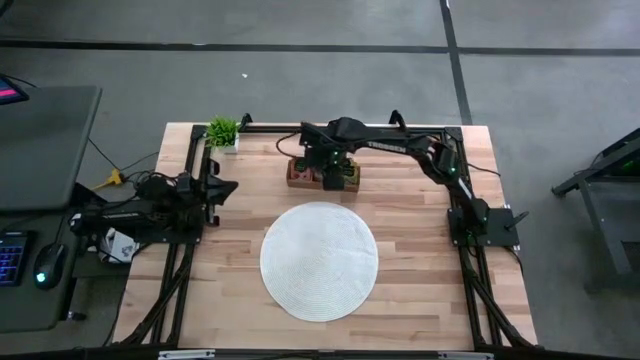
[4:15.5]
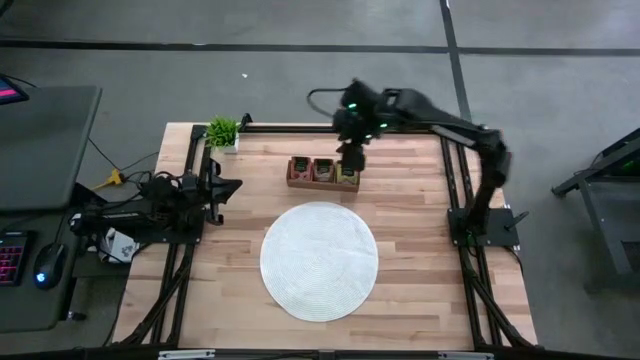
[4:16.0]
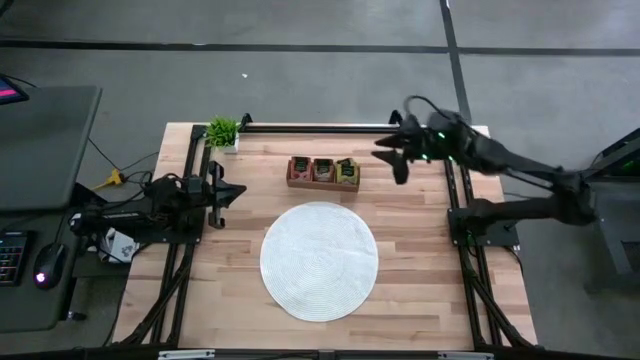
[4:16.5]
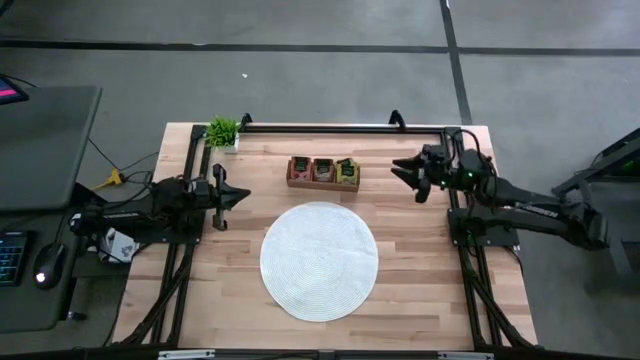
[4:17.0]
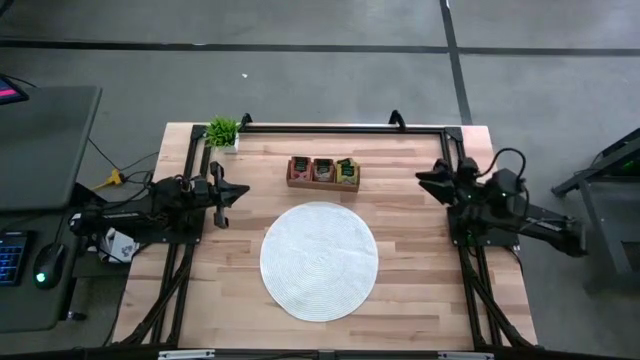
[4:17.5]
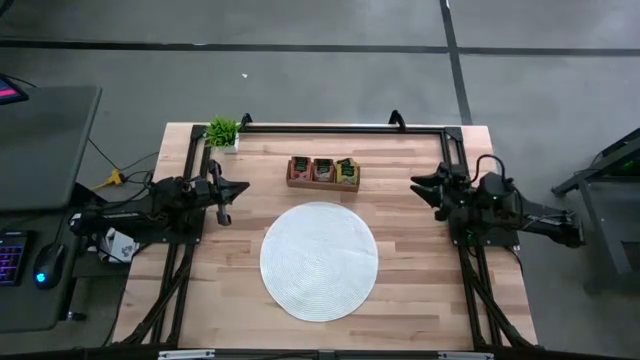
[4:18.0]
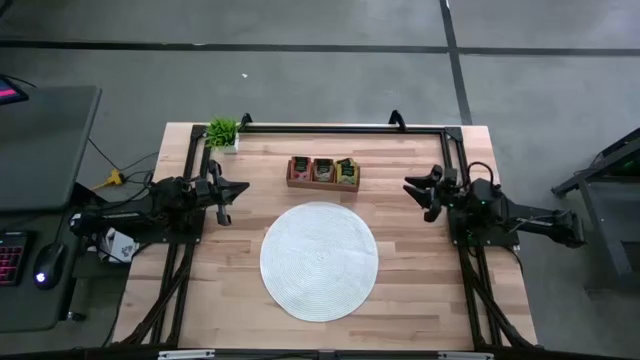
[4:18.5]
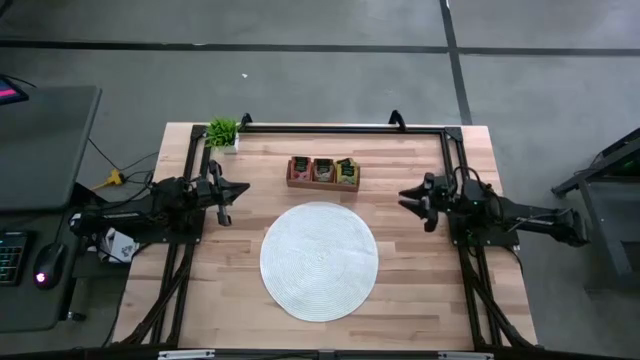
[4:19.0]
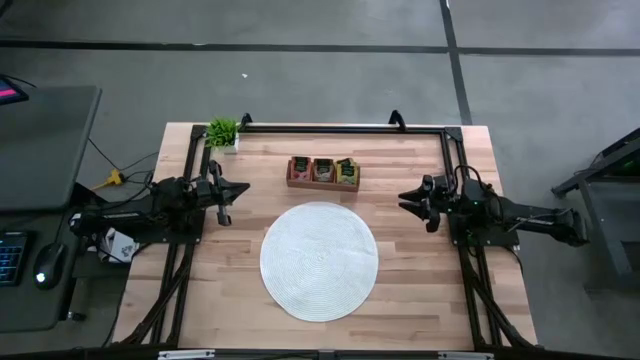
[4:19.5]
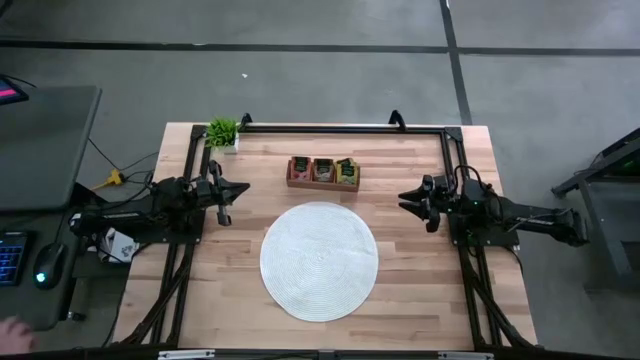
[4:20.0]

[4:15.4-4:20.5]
Task: Pick & Place Tea
Return to Home Position

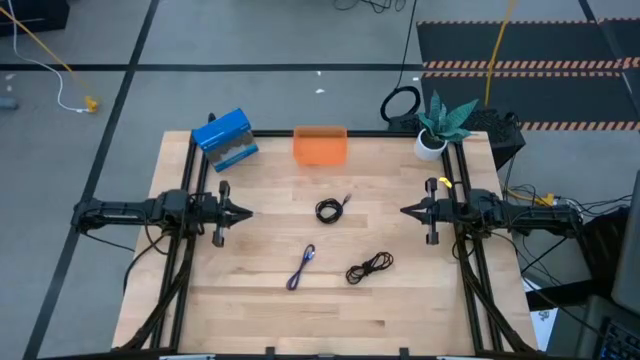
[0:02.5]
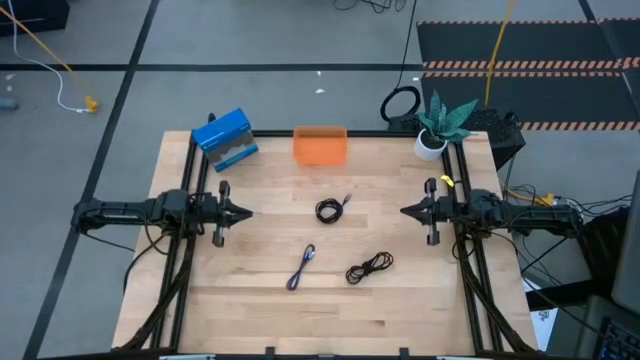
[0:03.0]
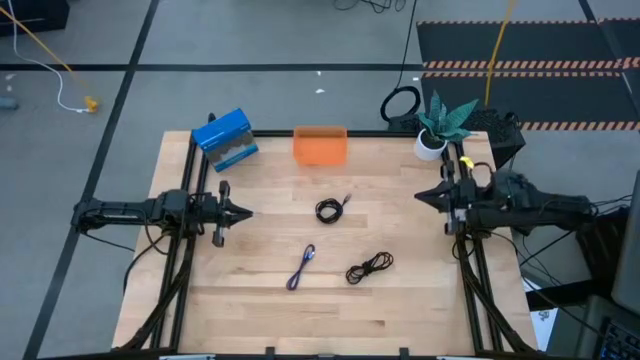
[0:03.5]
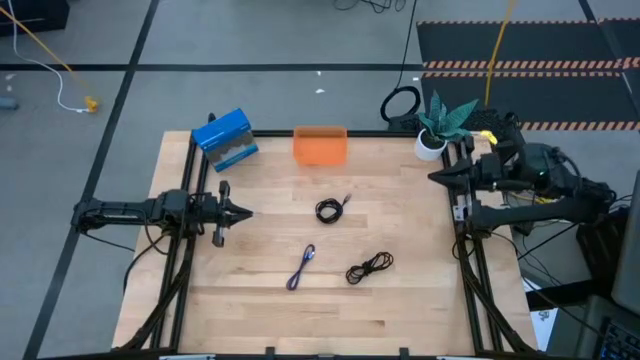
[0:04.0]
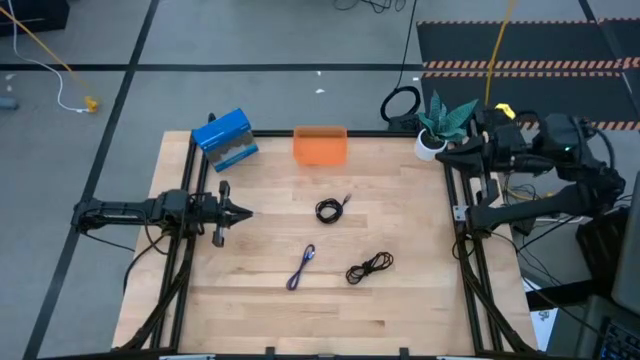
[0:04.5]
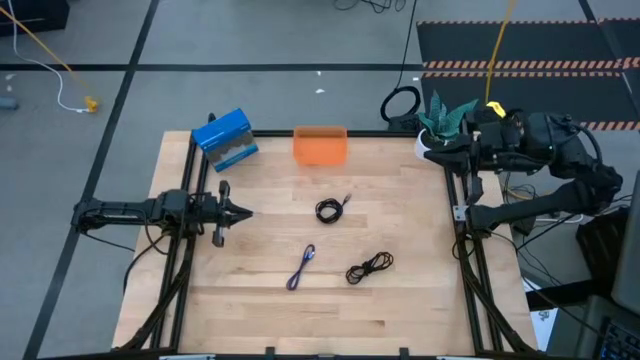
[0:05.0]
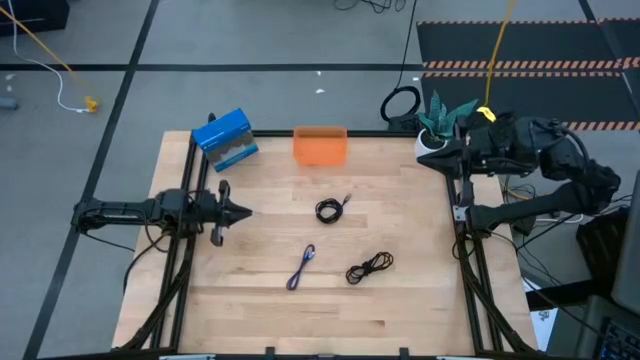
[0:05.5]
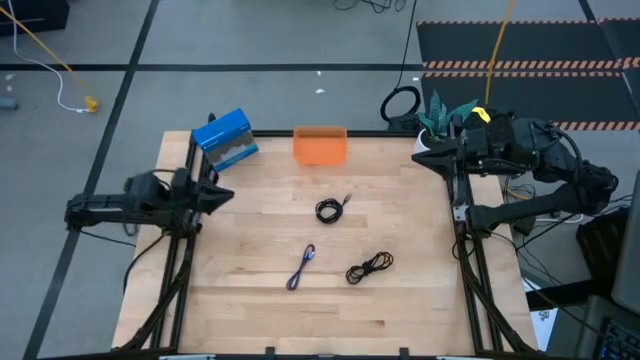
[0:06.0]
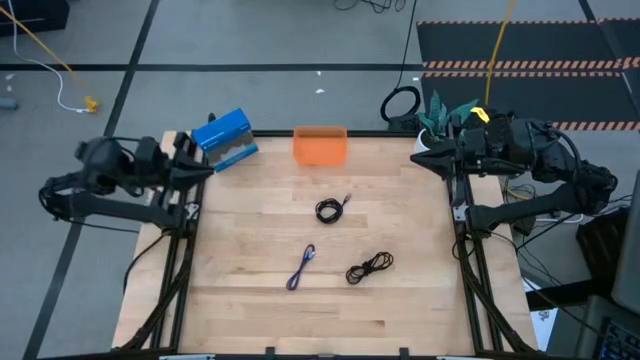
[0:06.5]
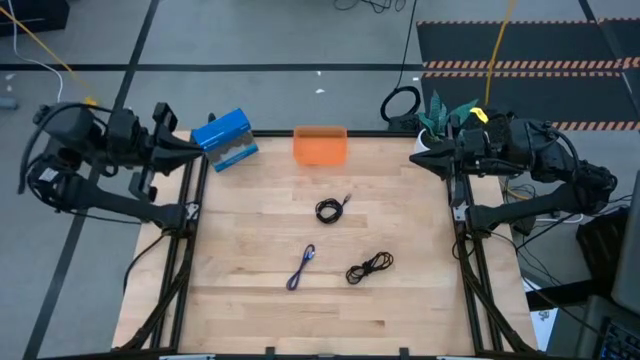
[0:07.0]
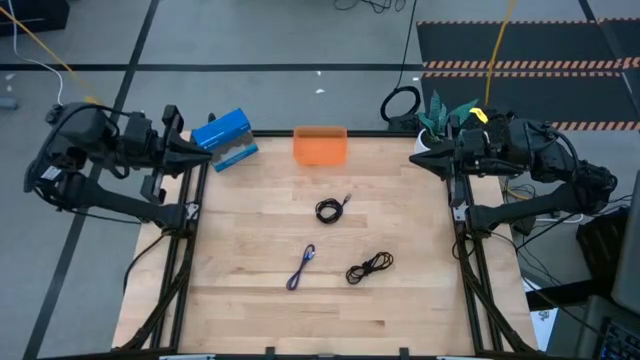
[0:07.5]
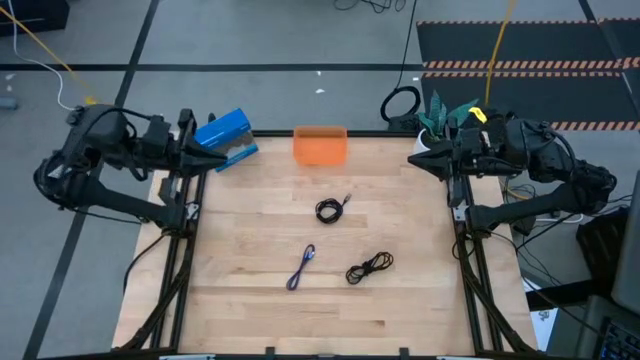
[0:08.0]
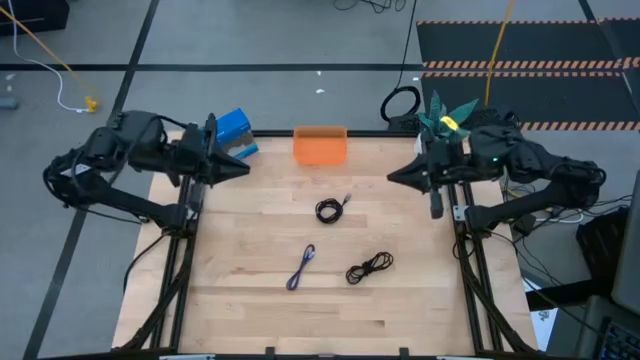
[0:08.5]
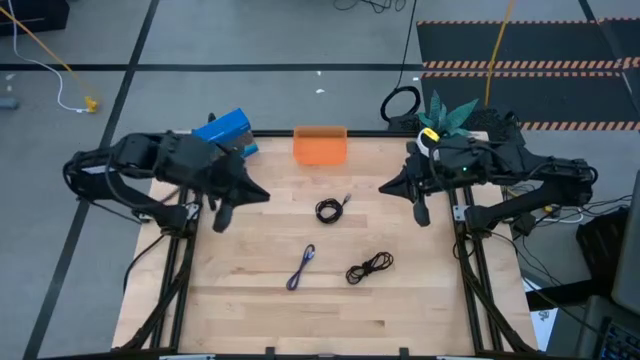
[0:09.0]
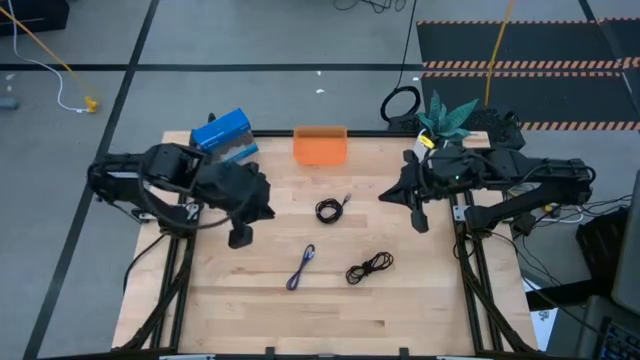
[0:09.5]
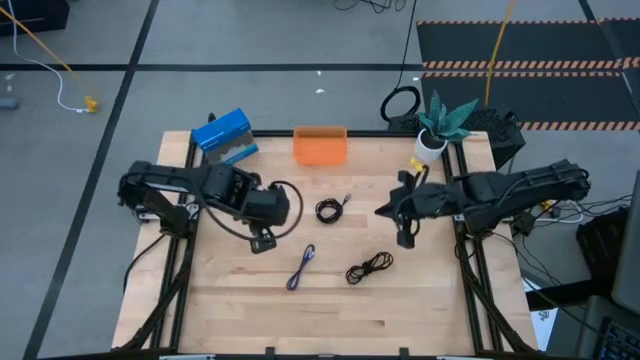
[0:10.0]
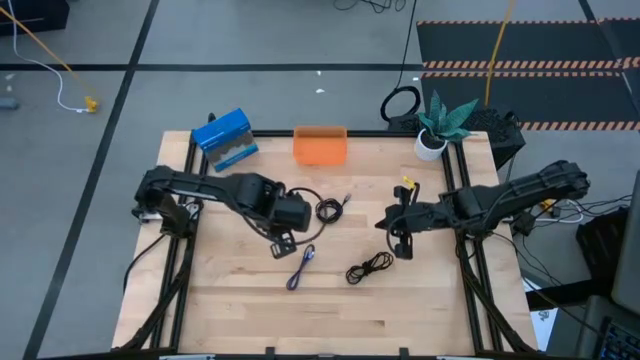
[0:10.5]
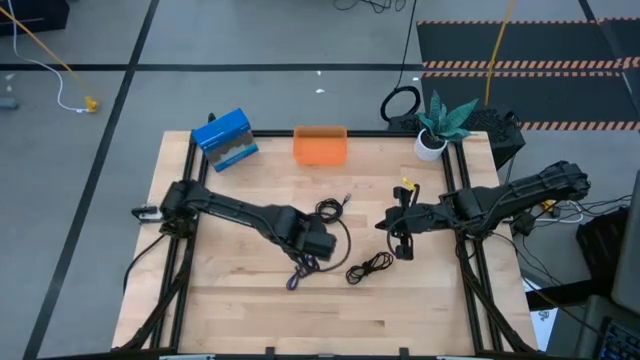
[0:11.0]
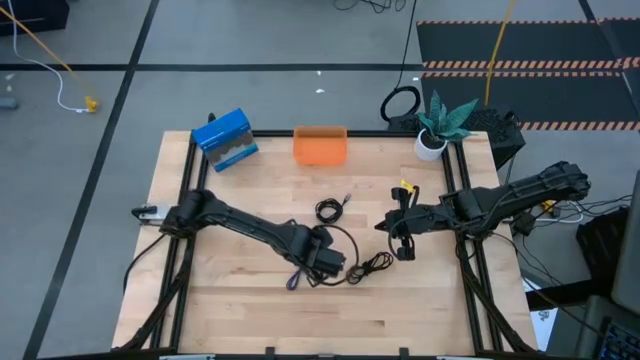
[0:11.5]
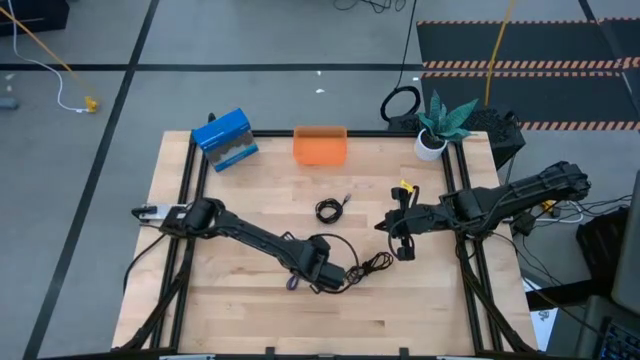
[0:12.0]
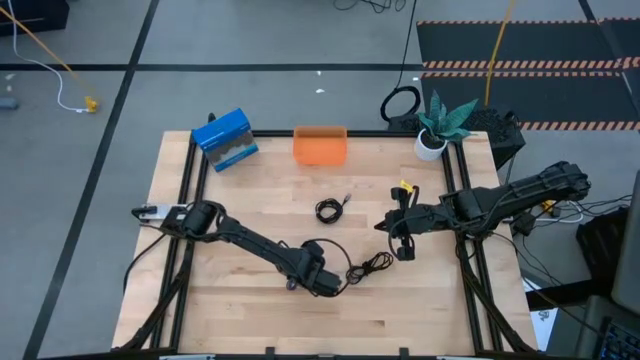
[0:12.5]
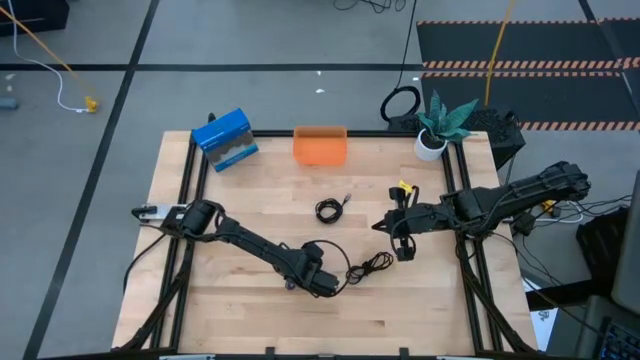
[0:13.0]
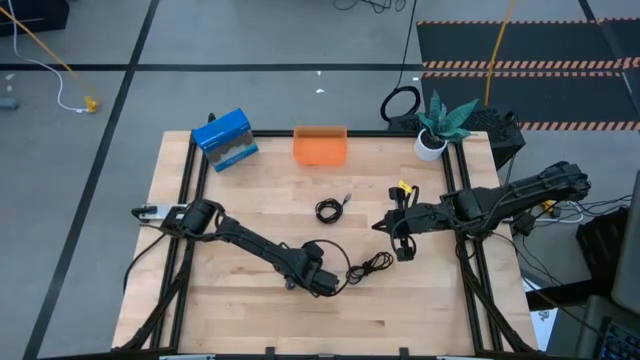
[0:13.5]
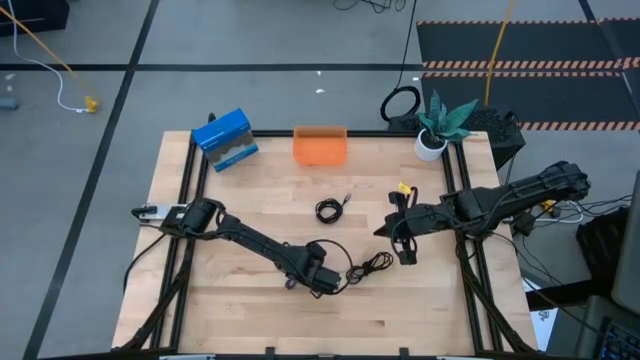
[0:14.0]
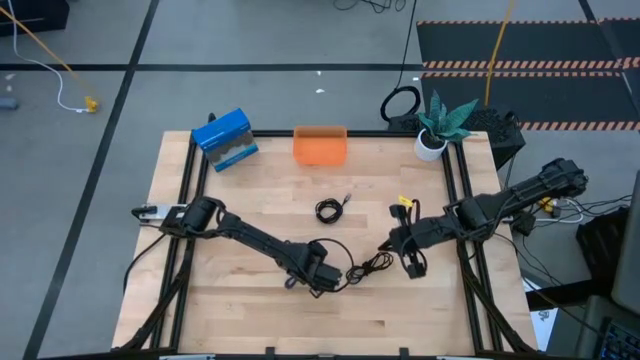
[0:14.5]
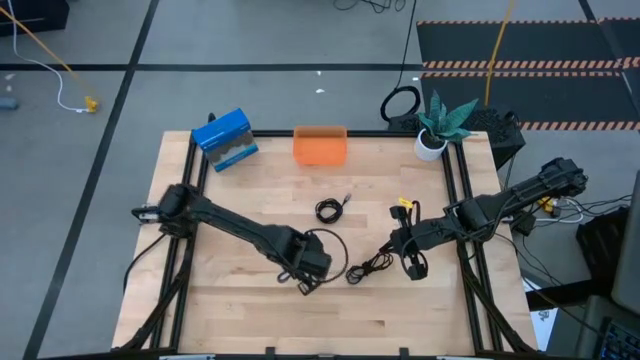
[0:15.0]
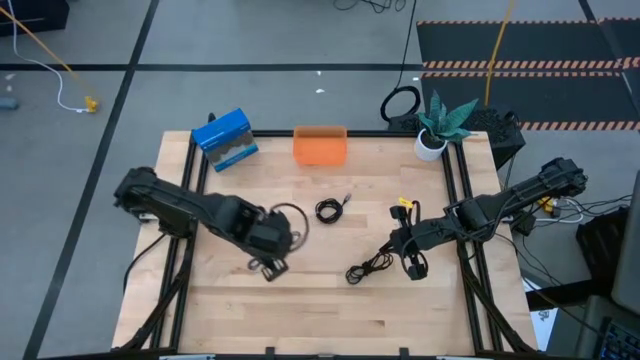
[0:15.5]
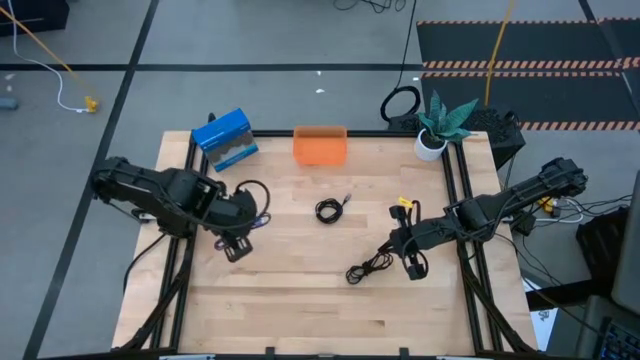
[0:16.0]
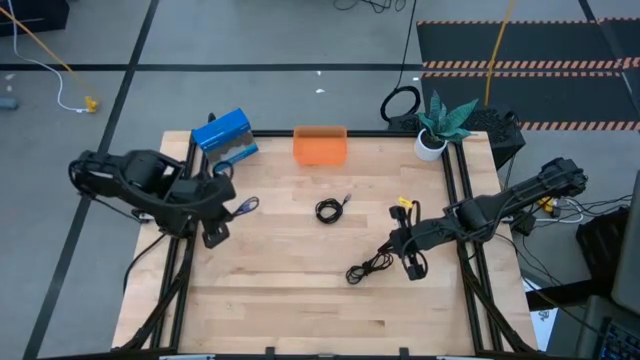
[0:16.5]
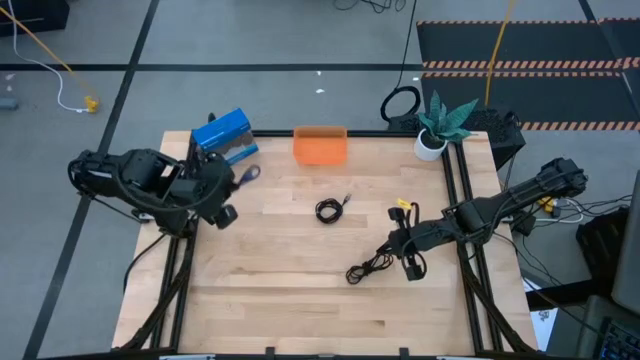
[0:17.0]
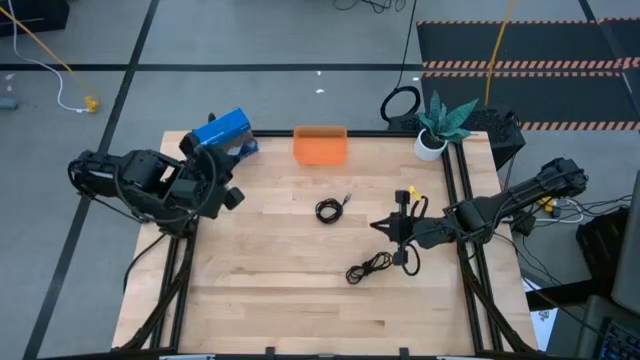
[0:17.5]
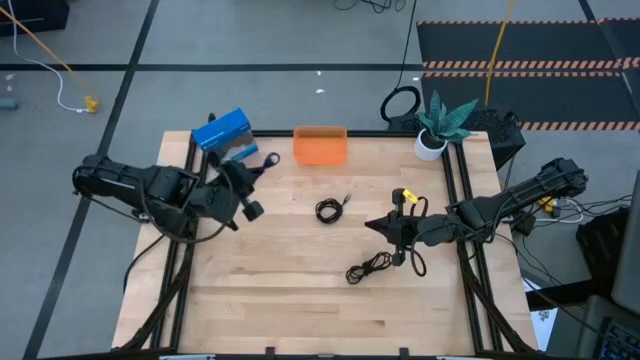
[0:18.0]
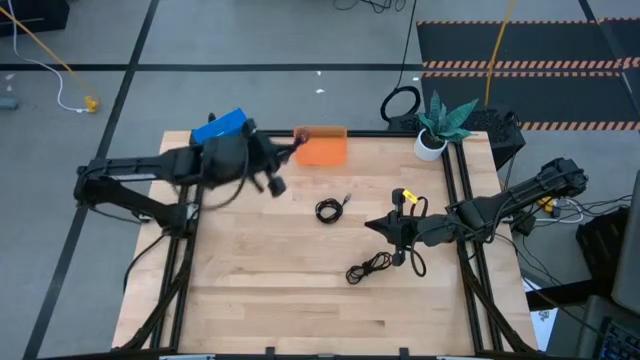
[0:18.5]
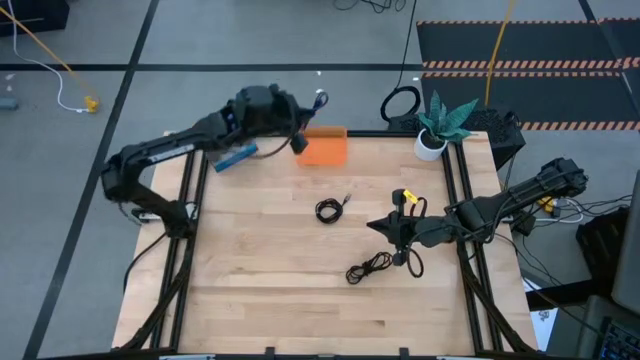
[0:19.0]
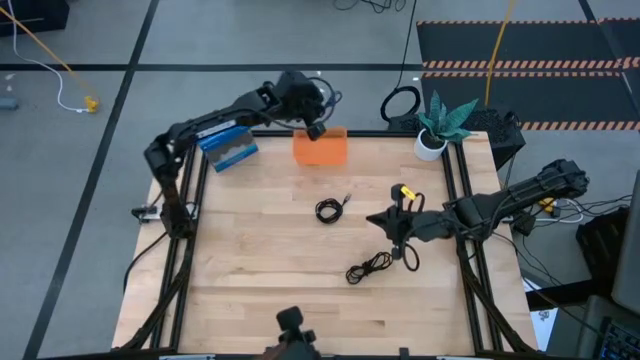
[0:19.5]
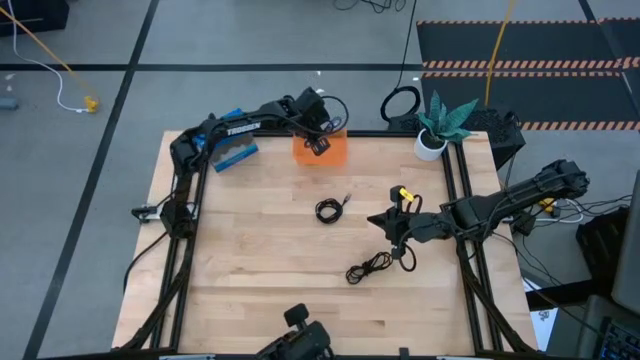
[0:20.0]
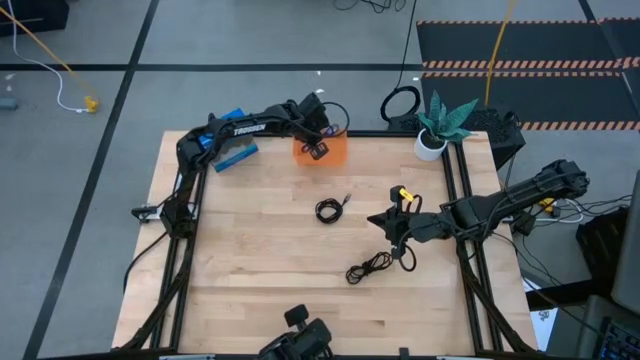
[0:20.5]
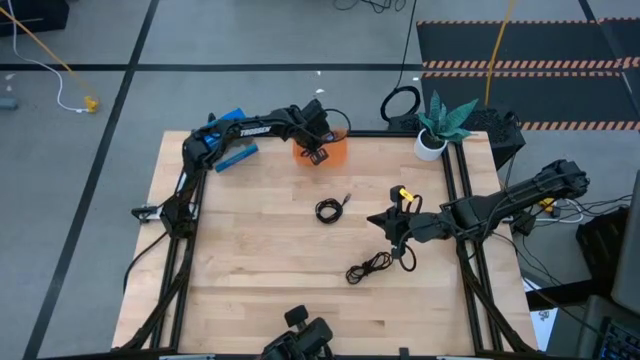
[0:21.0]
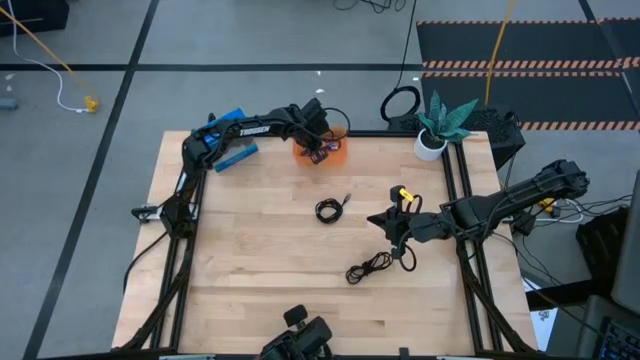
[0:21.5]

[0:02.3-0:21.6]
Task: Pick and place USB-C Cables
Put the blue charger cable into the orange bin
